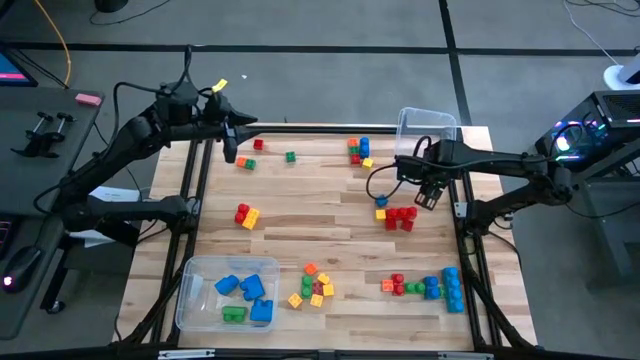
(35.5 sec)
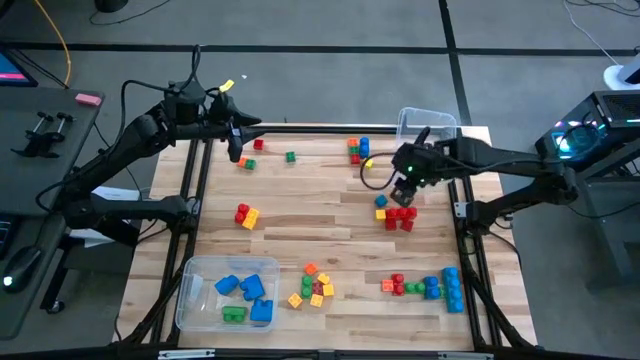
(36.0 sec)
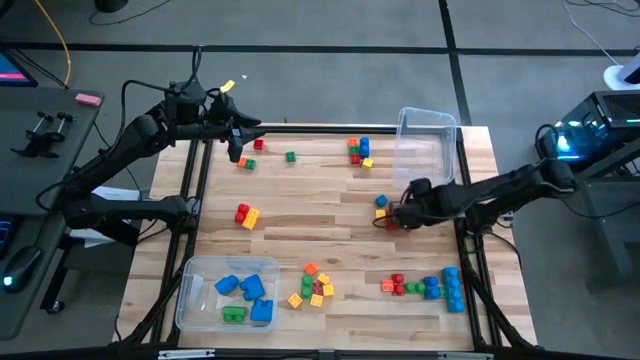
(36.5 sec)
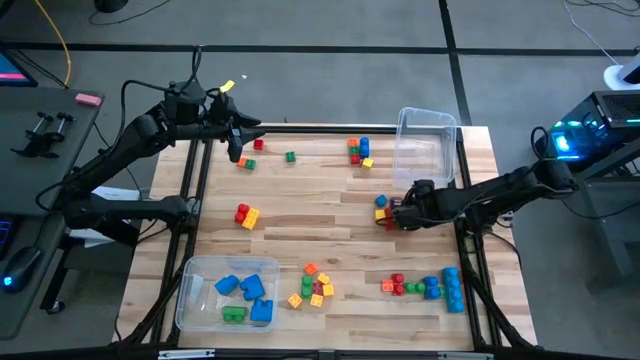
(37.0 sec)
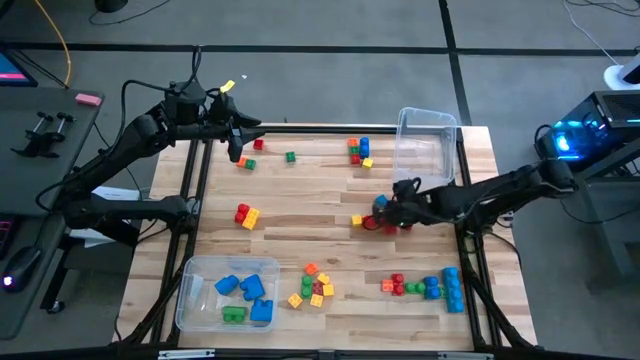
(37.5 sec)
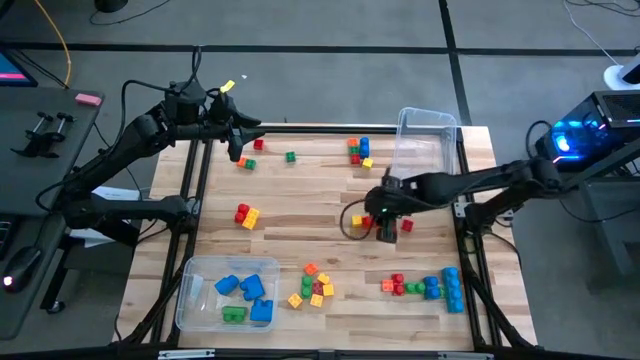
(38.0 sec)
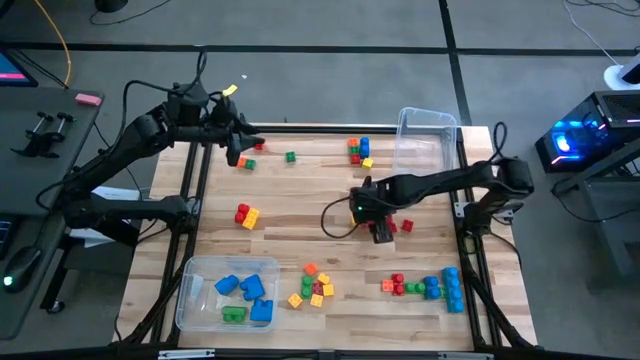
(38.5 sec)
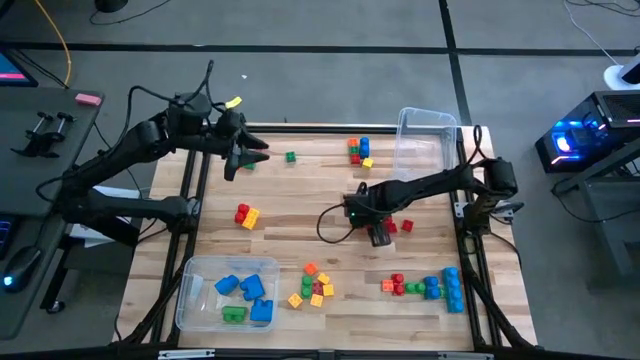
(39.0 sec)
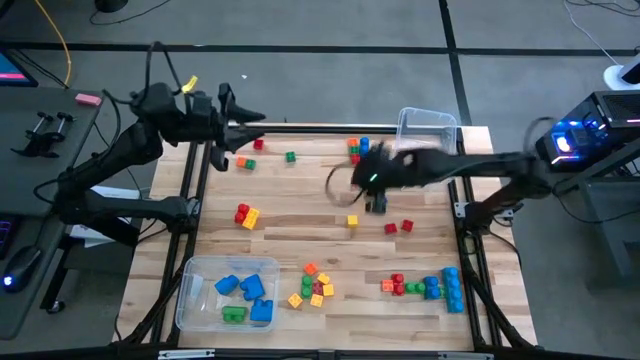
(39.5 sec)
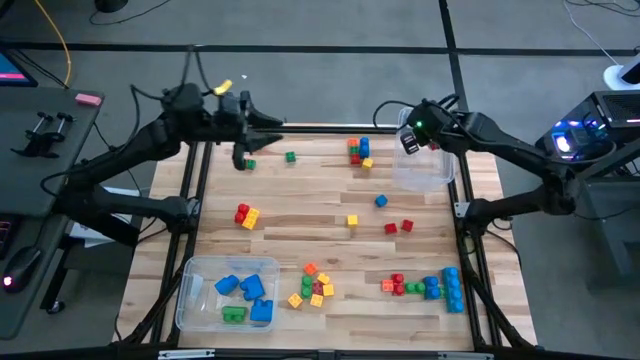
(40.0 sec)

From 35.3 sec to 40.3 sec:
Task: Sort blocks by size
Put the large red game piece into the right transparent bin

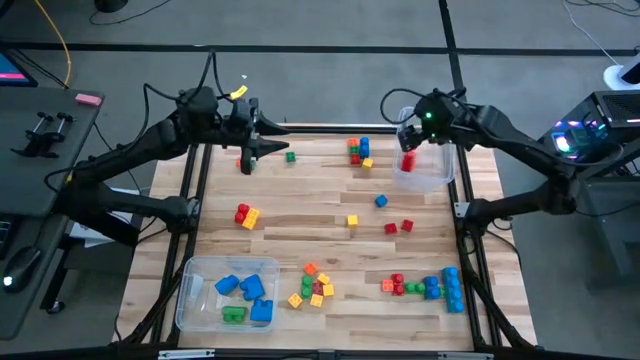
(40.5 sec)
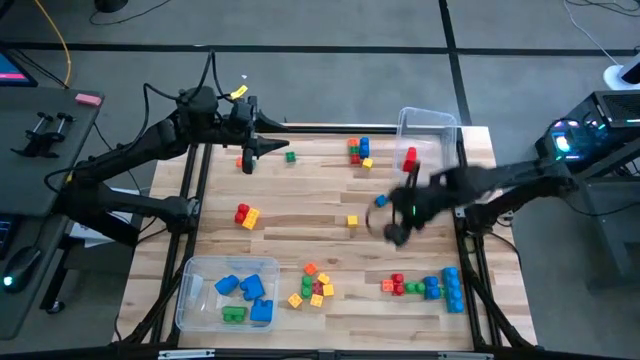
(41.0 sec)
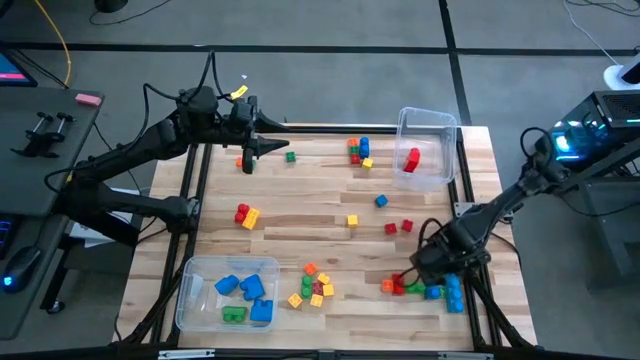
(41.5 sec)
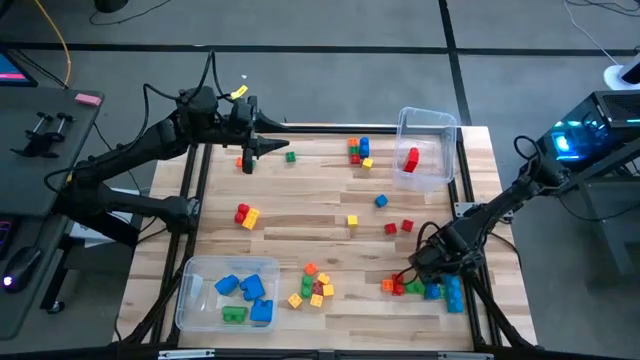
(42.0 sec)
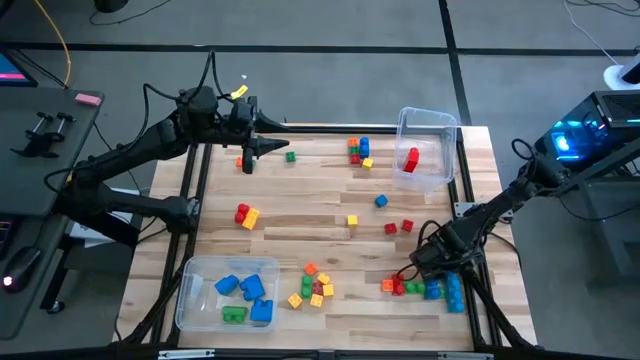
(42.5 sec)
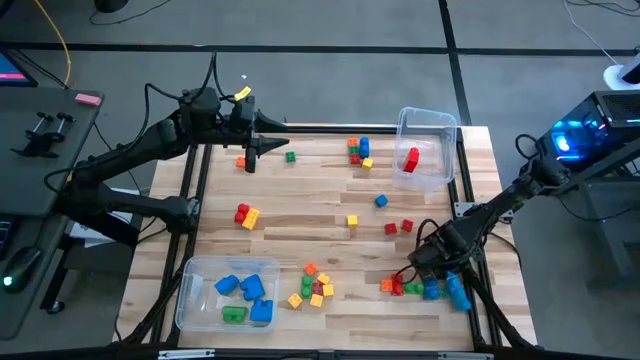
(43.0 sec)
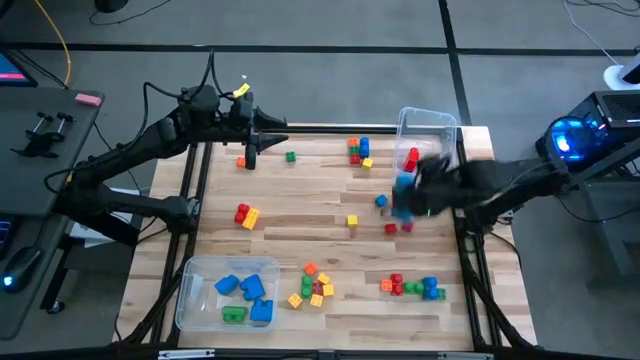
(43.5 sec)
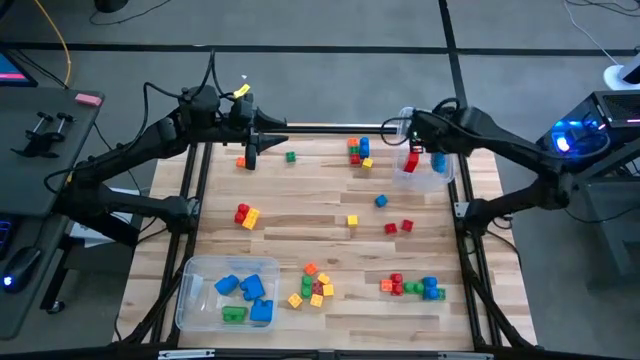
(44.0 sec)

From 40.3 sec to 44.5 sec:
Put the large blue game piece into the right transparent bin

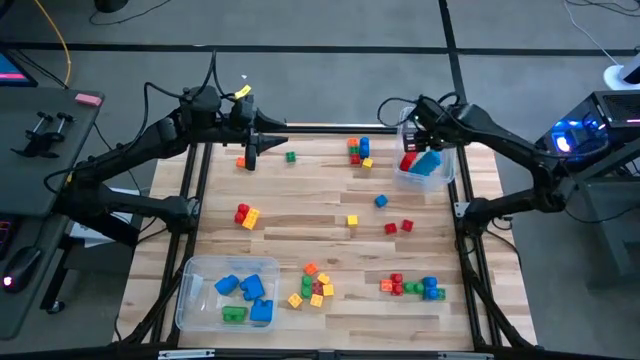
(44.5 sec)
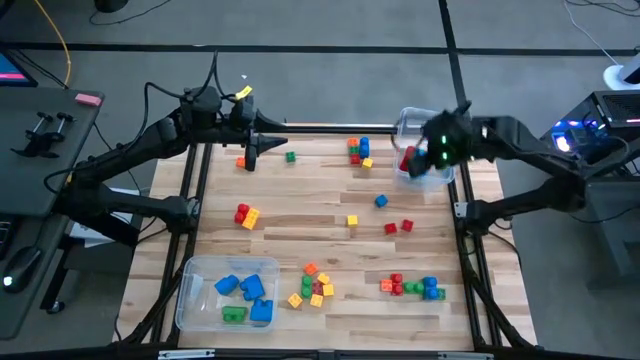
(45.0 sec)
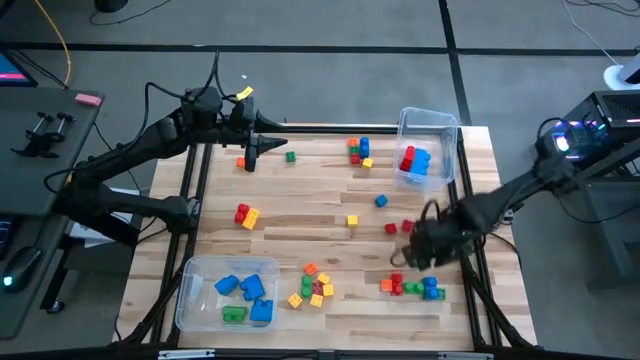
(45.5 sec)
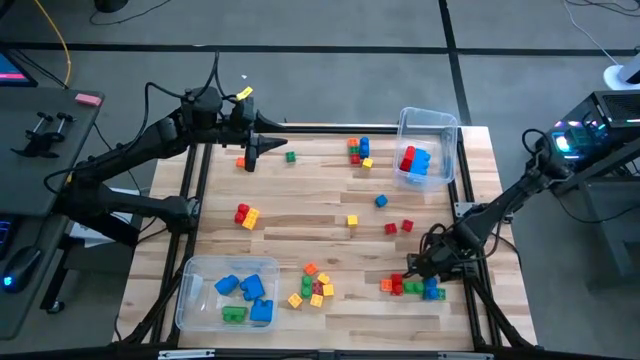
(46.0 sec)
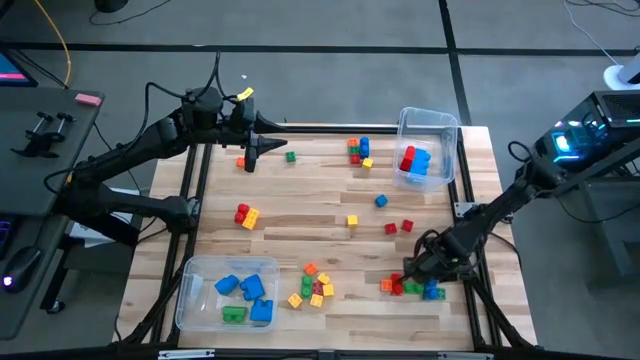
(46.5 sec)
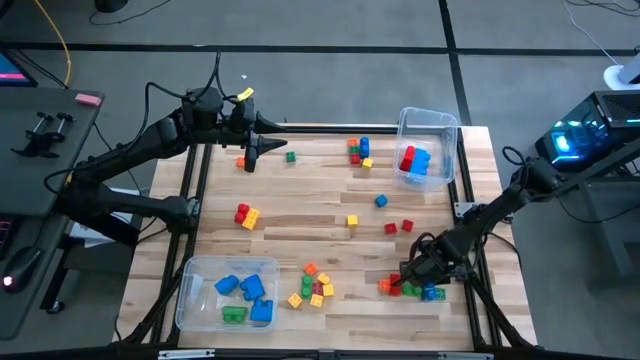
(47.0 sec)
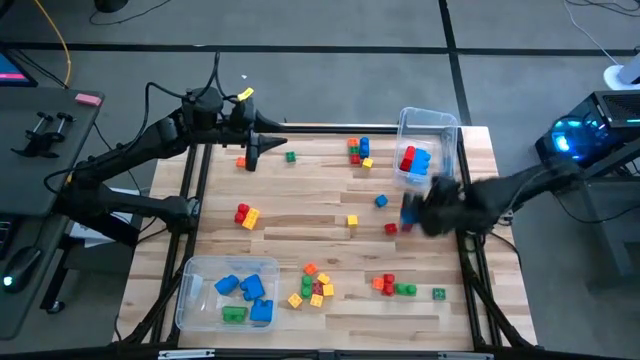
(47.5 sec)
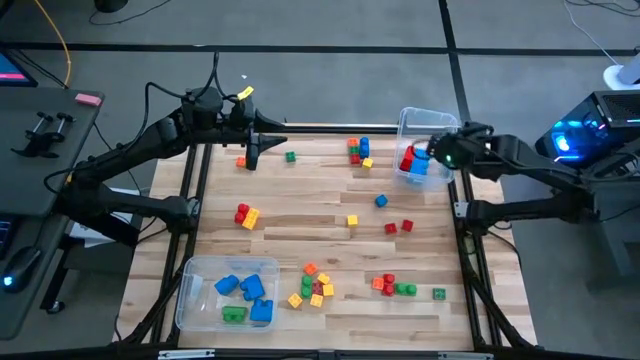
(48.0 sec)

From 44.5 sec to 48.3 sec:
Put the large blue game piece into the right transparent bin

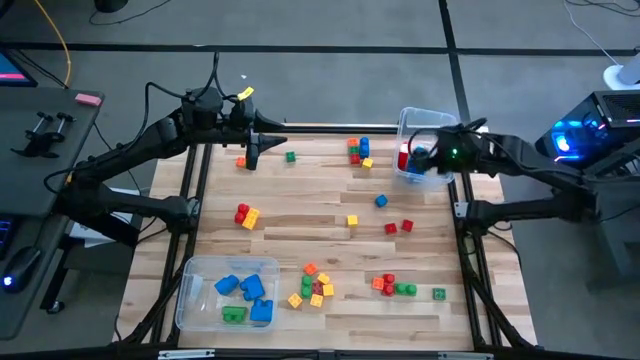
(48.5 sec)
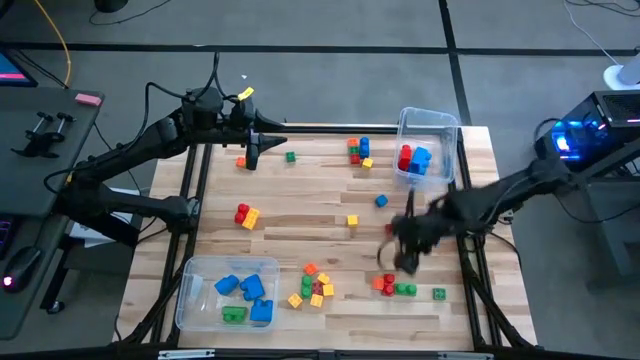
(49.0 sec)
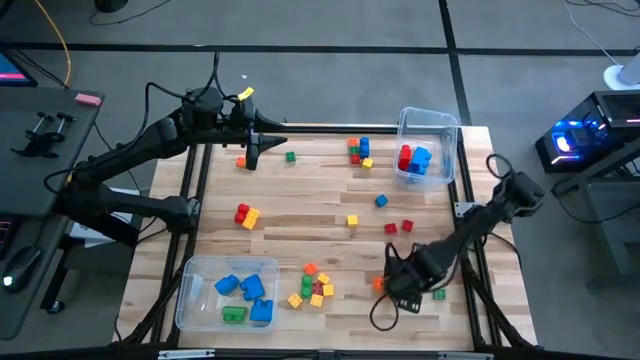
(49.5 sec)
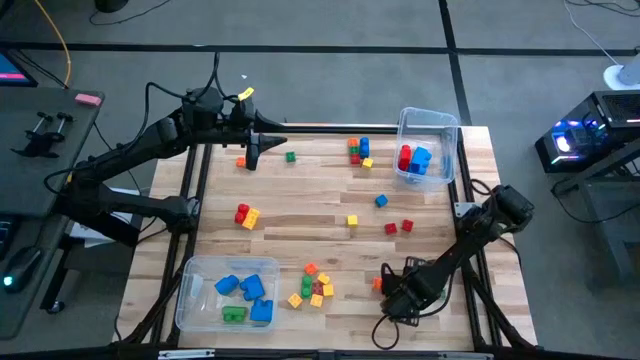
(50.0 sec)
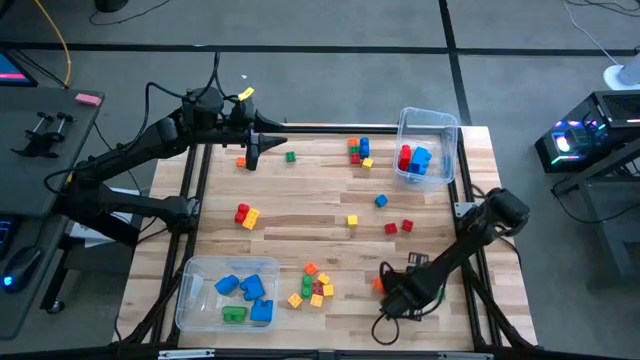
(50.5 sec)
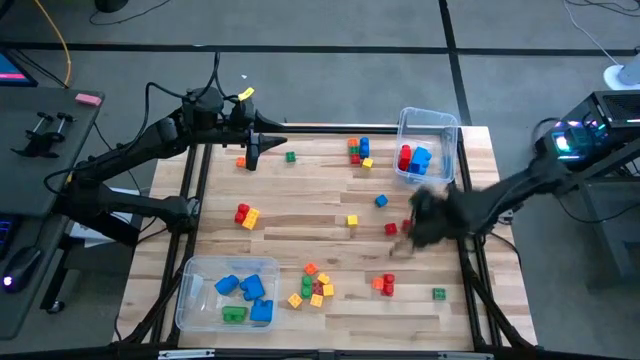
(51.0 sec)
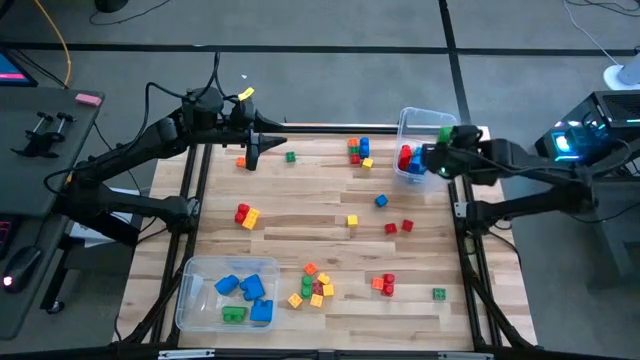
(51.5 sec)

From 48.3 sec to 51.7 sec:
Put the large green game piece into the right transparent bin

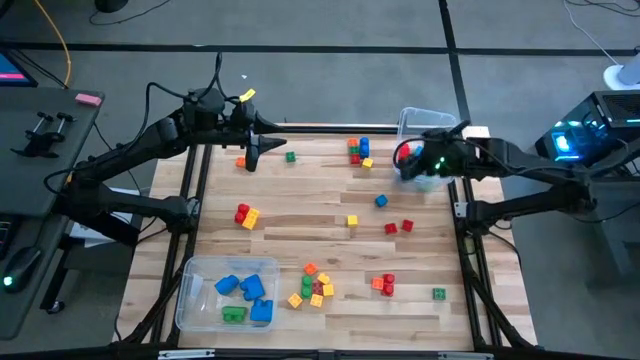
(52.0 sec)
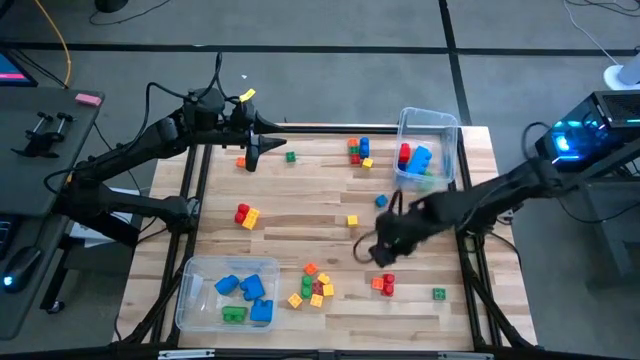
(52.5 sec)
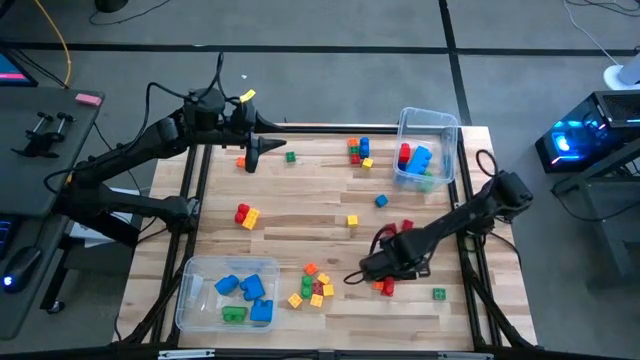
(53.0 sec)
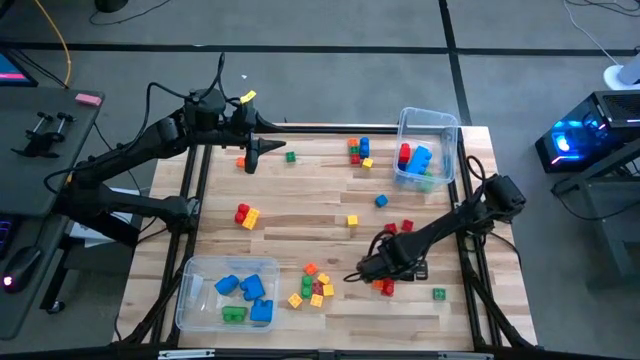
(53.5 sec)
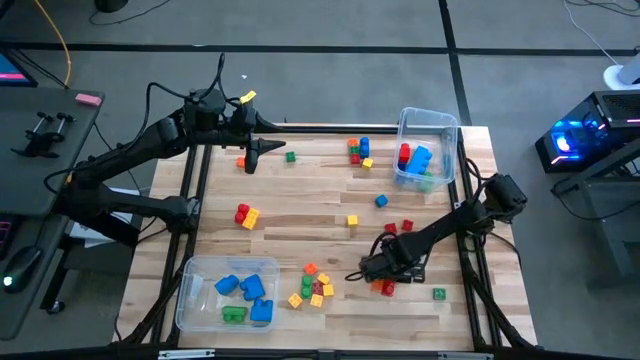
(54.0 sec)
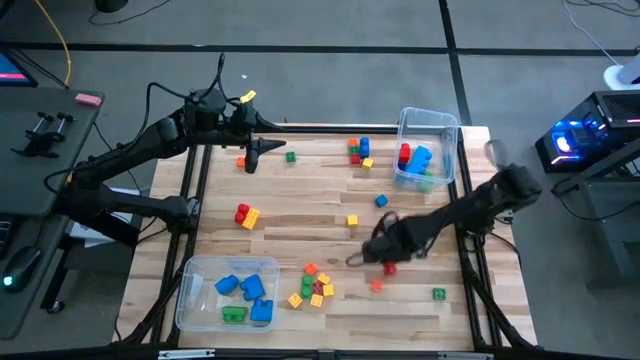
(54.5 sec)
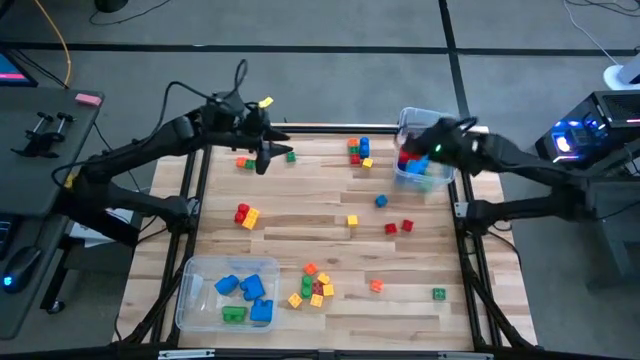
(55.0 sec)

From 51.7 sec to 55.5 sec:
Put the large red game piece into the right transparent bin

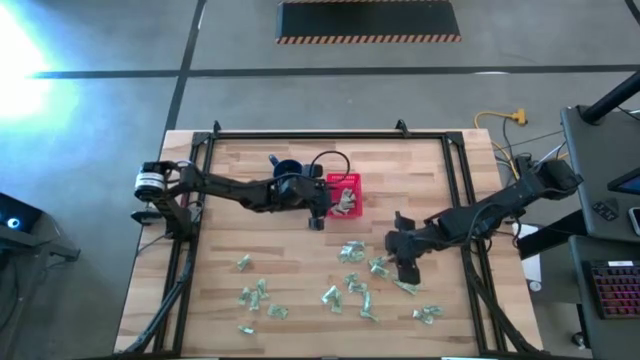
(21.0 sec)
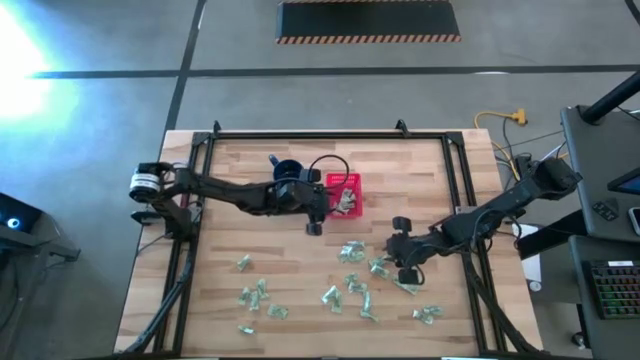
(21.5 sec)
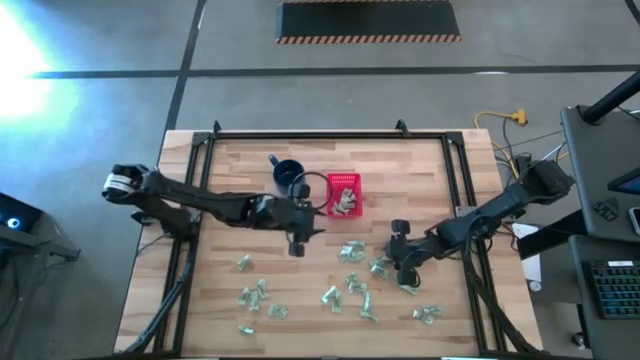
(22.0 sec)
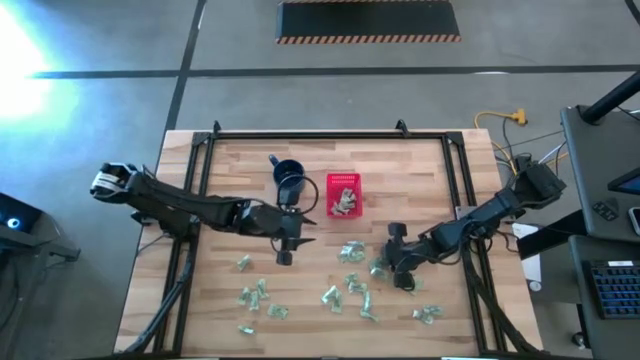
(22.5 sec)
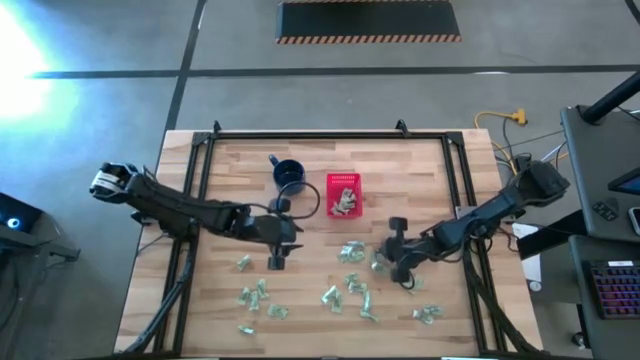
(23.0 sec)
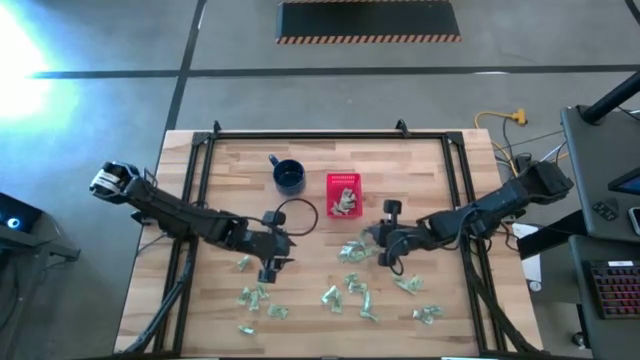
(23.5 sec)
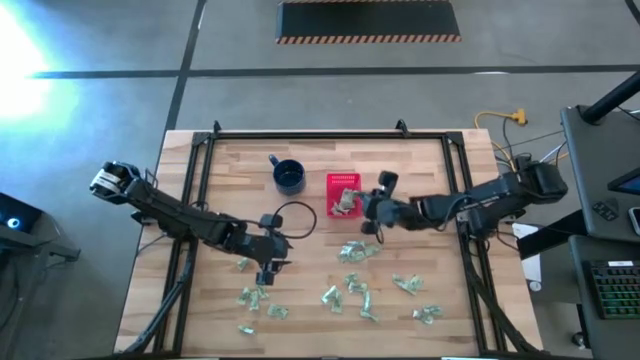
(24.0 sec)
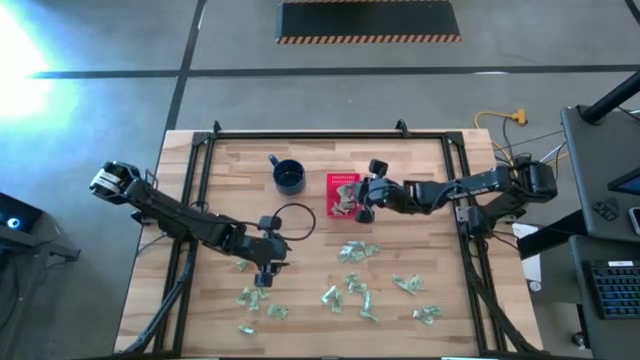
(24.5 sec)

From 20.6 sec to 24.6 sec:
Task: Pick and place items into bin
Put the green stevia packet into the red bin
